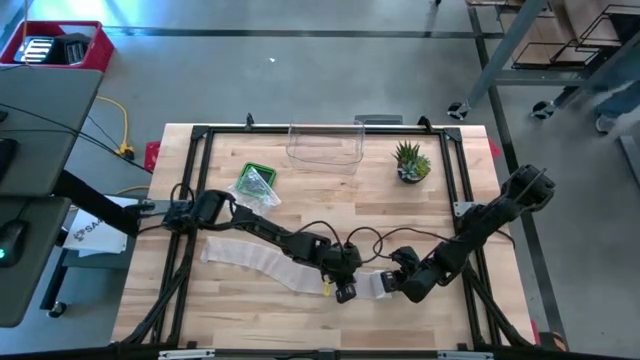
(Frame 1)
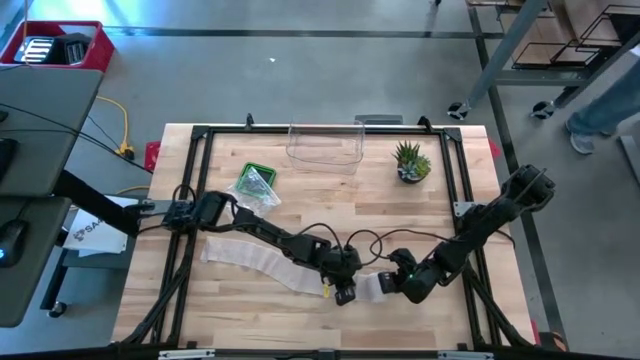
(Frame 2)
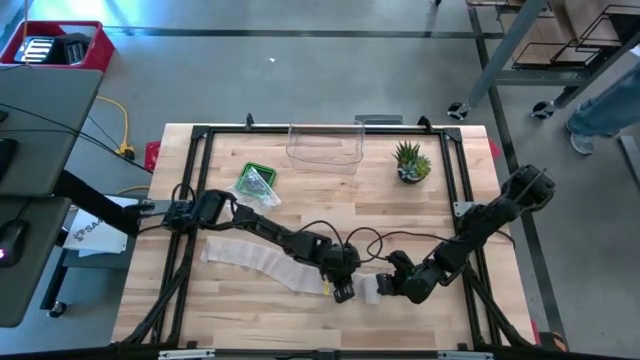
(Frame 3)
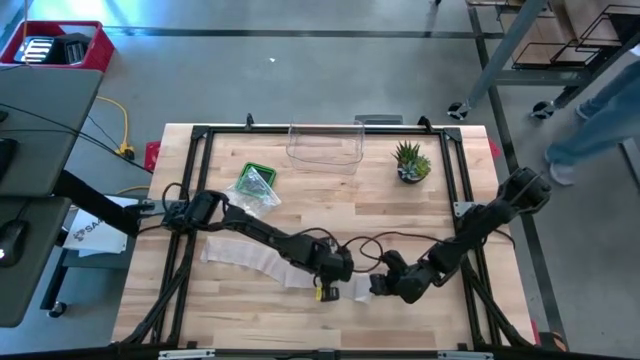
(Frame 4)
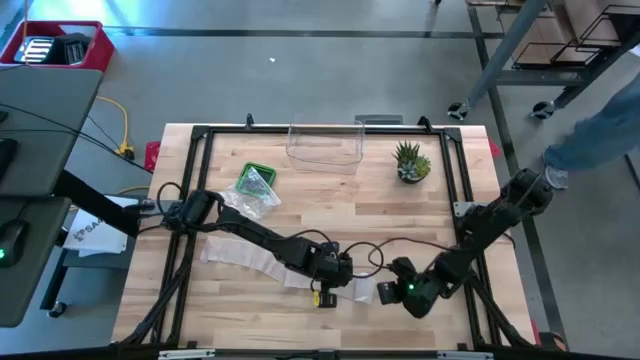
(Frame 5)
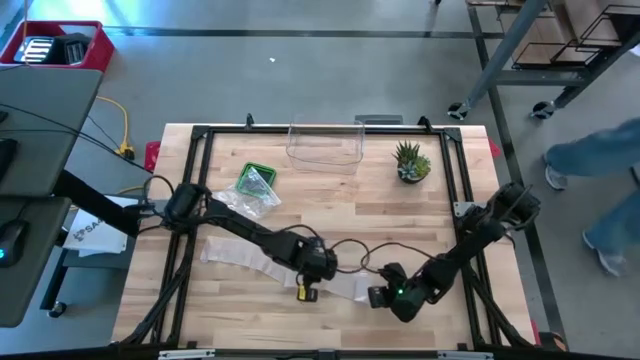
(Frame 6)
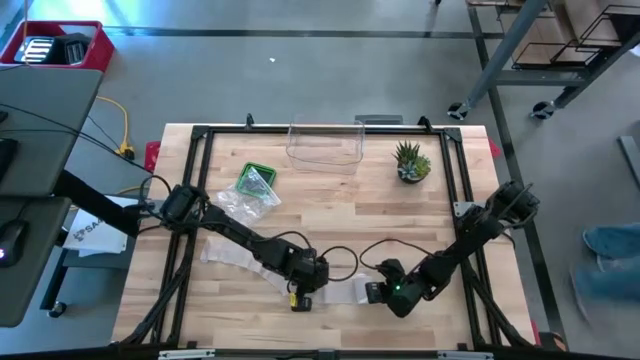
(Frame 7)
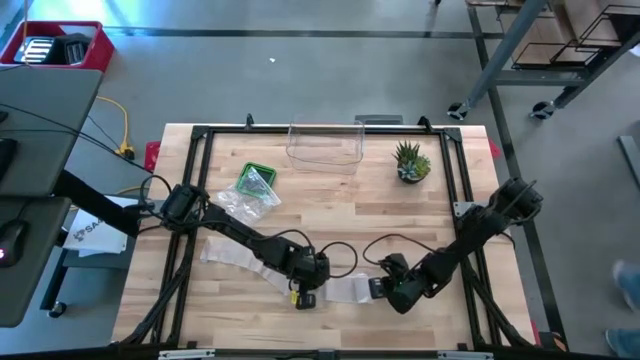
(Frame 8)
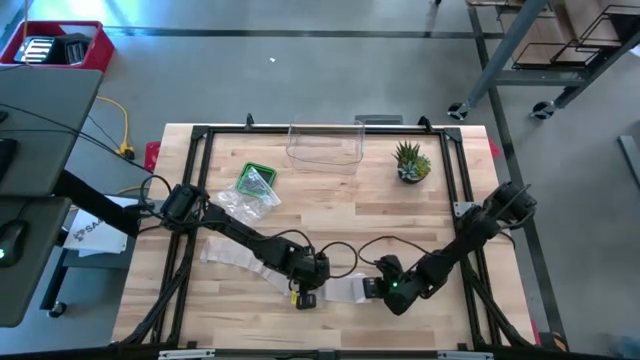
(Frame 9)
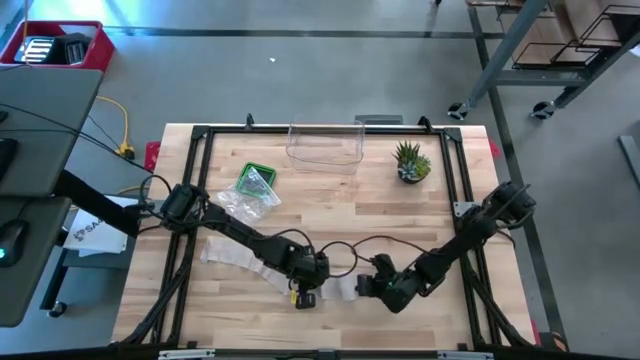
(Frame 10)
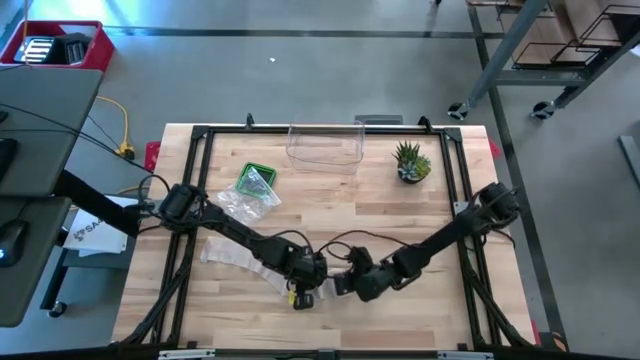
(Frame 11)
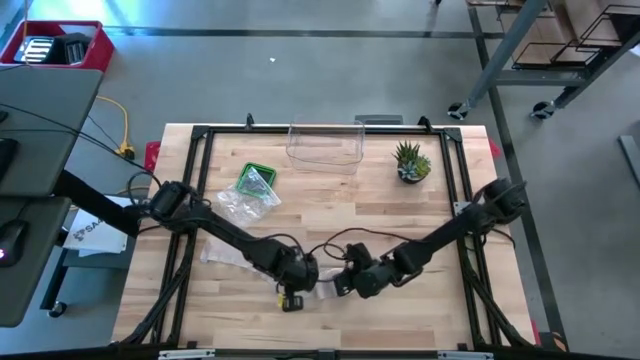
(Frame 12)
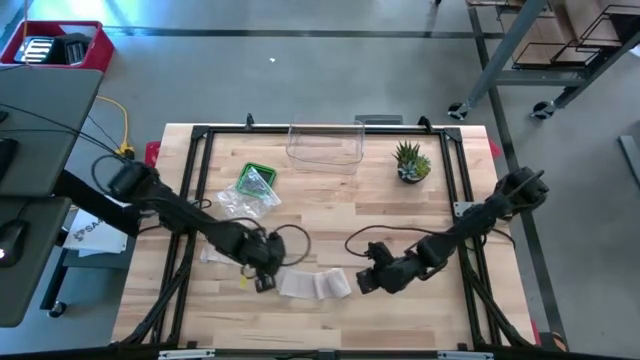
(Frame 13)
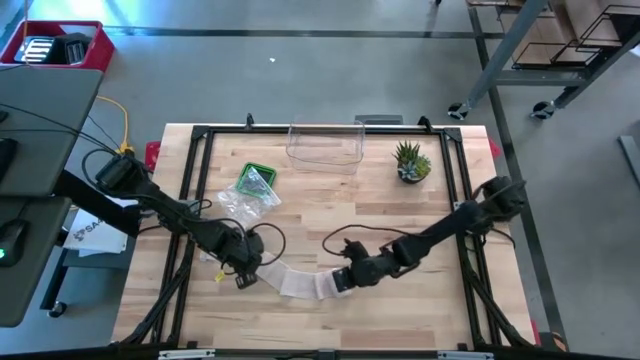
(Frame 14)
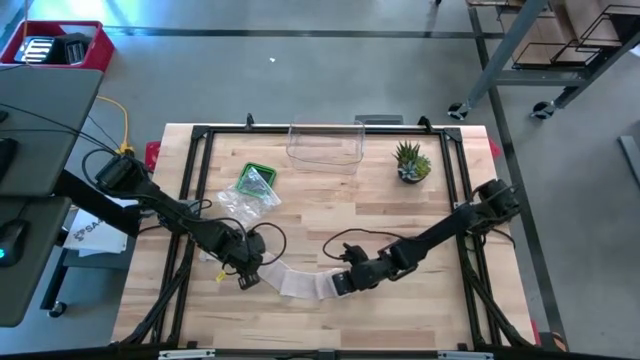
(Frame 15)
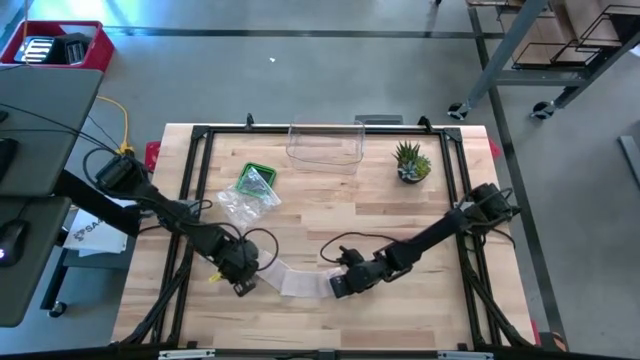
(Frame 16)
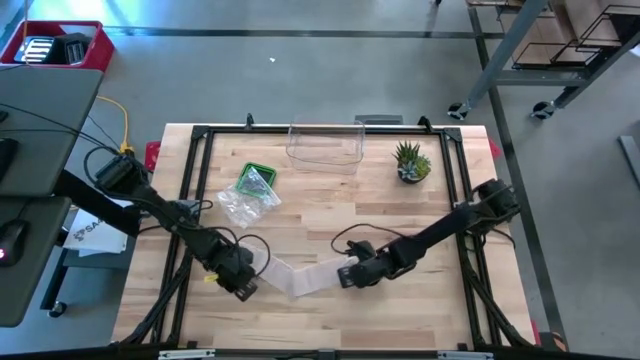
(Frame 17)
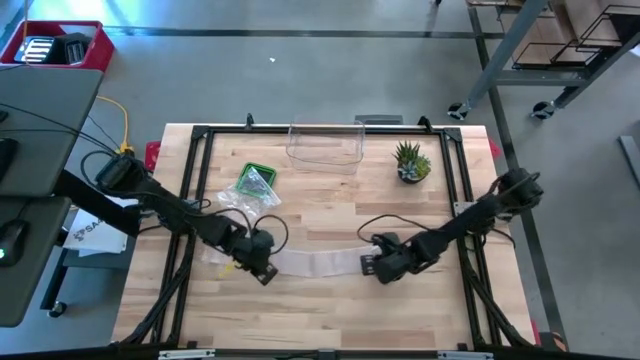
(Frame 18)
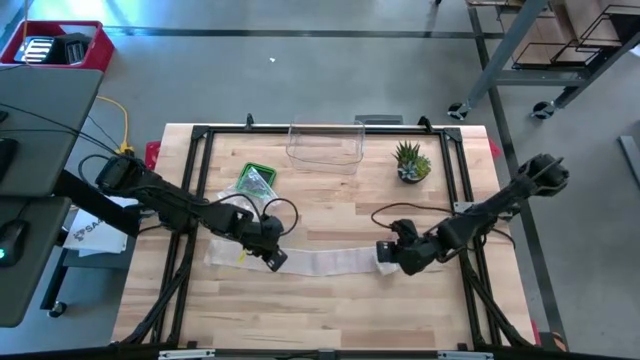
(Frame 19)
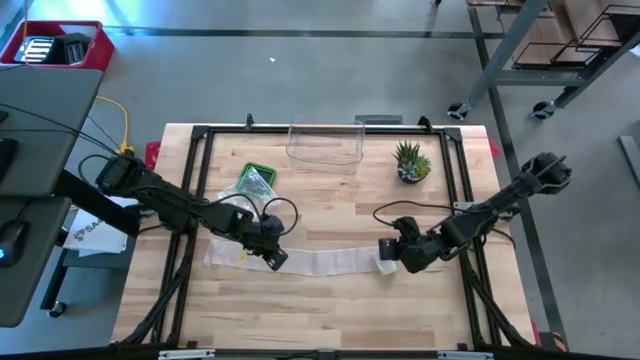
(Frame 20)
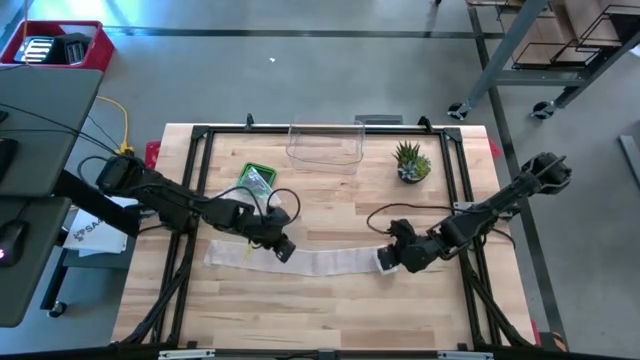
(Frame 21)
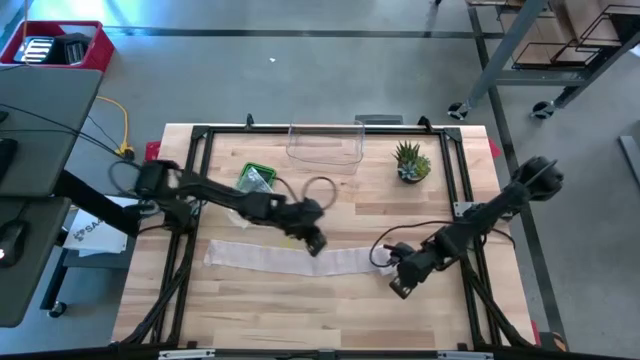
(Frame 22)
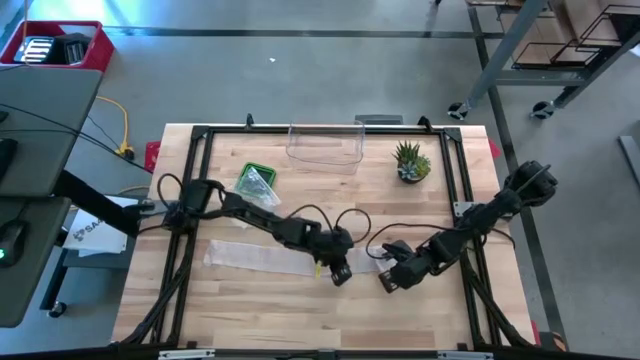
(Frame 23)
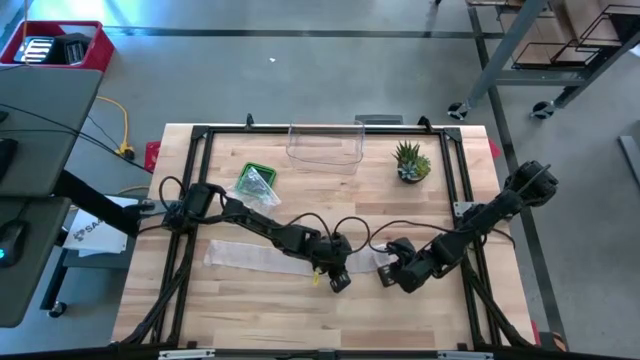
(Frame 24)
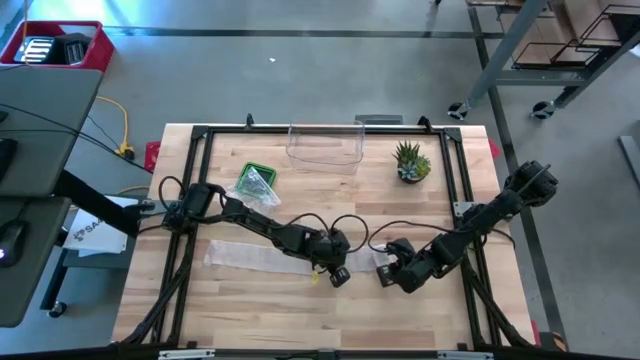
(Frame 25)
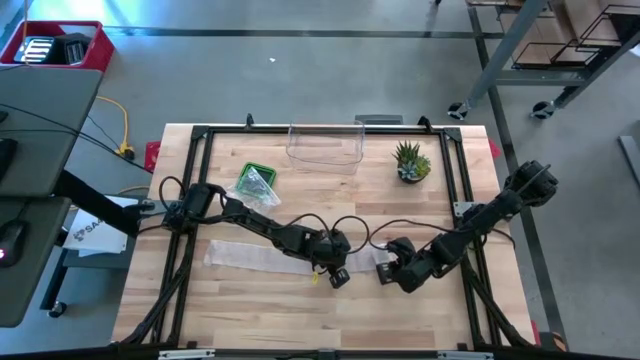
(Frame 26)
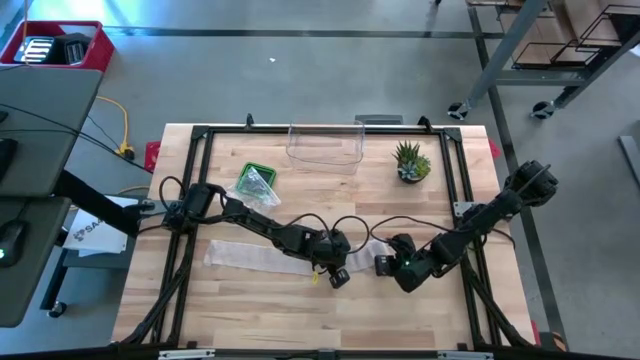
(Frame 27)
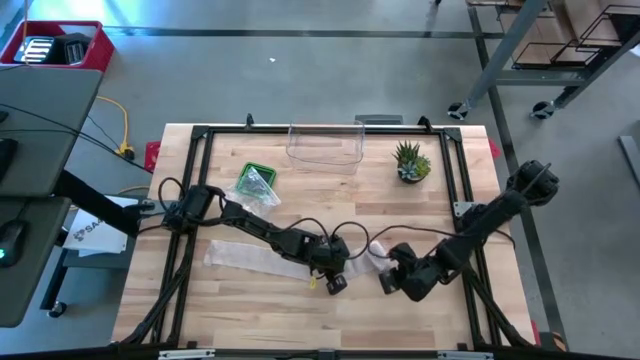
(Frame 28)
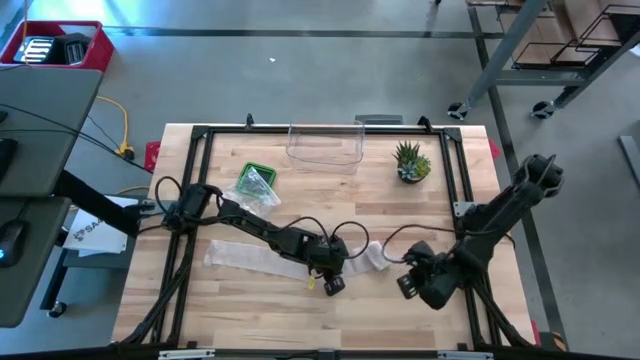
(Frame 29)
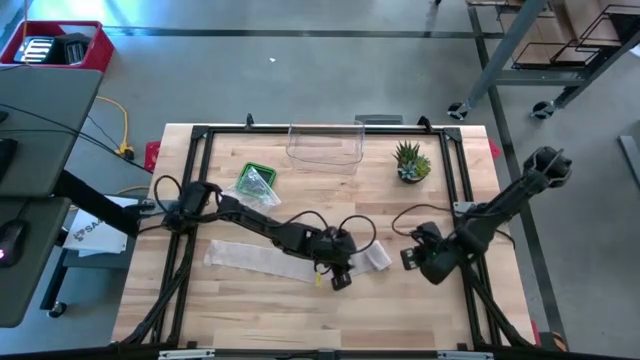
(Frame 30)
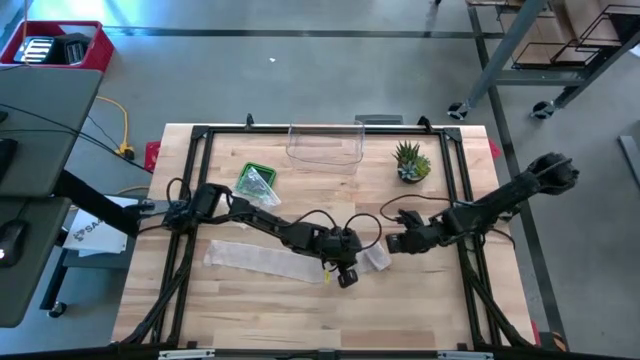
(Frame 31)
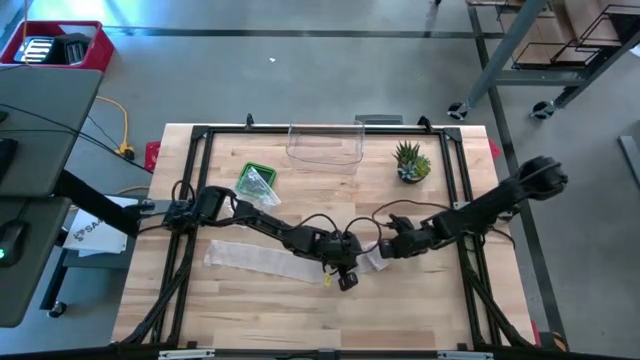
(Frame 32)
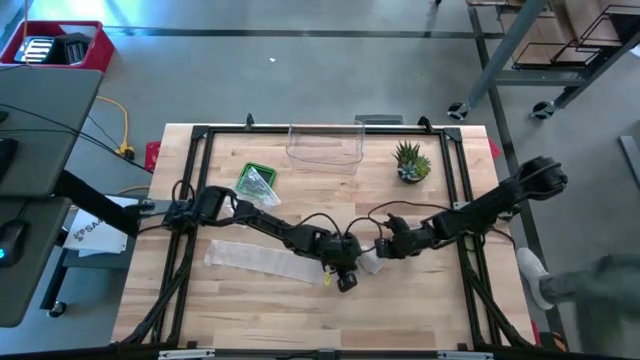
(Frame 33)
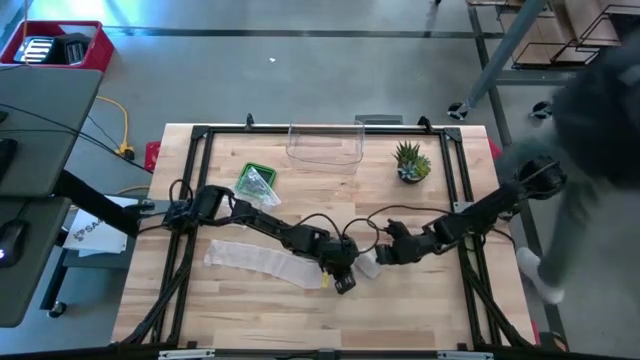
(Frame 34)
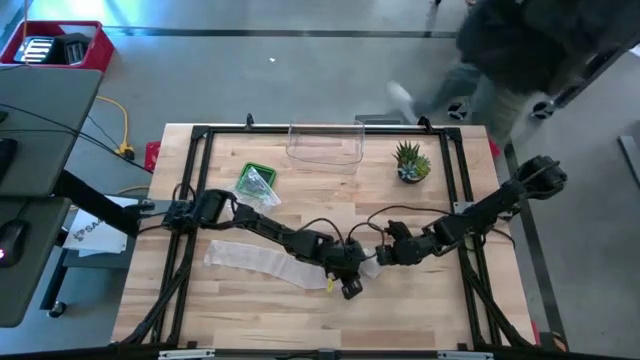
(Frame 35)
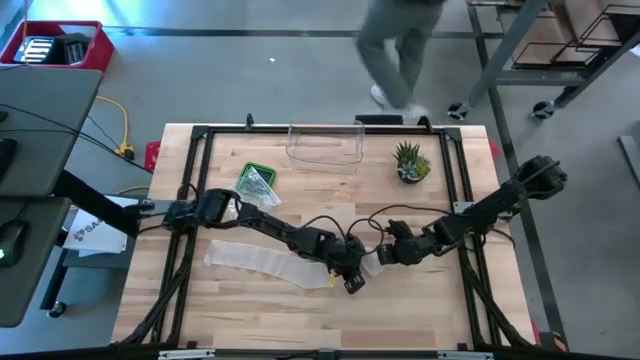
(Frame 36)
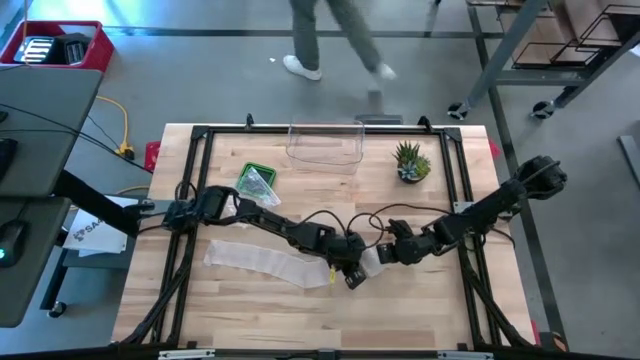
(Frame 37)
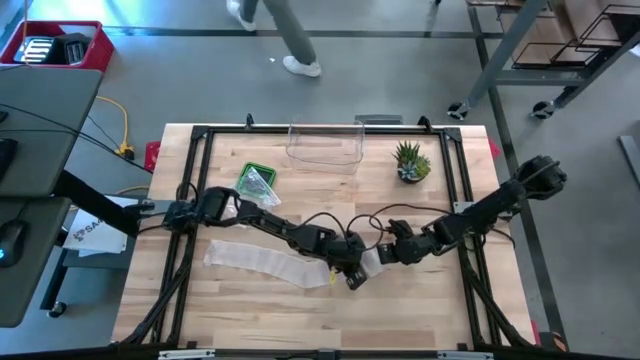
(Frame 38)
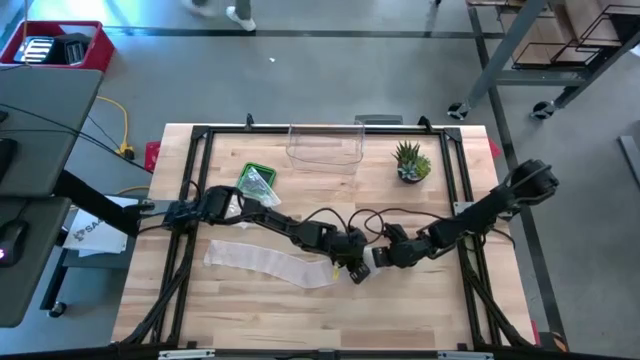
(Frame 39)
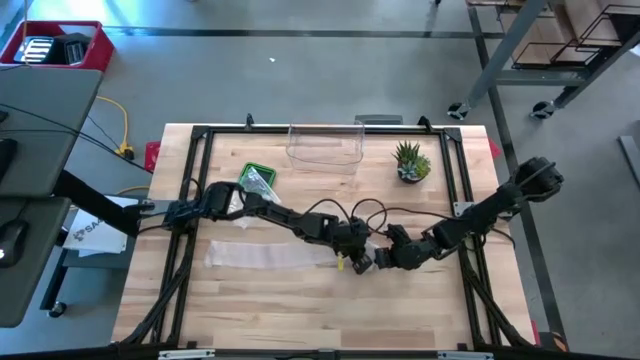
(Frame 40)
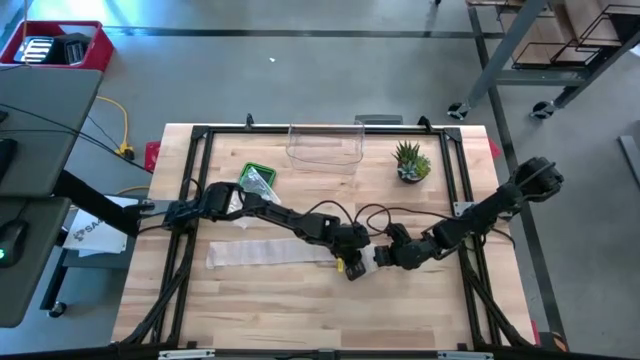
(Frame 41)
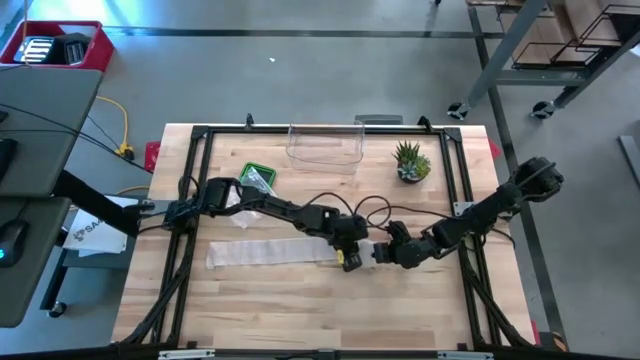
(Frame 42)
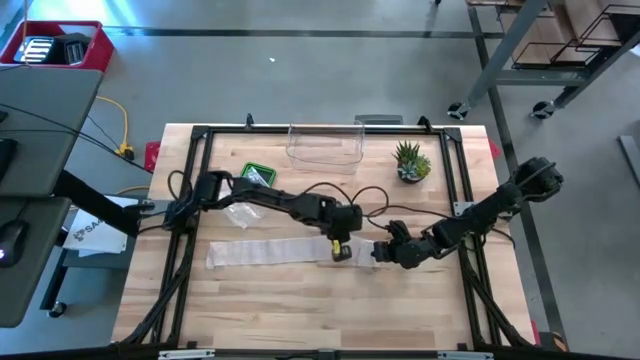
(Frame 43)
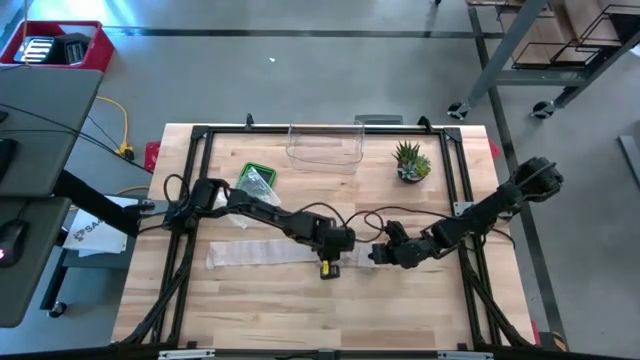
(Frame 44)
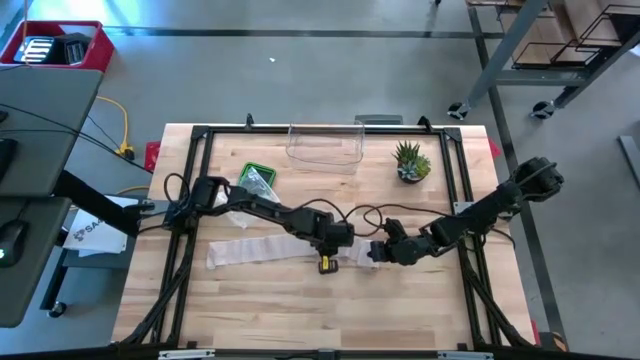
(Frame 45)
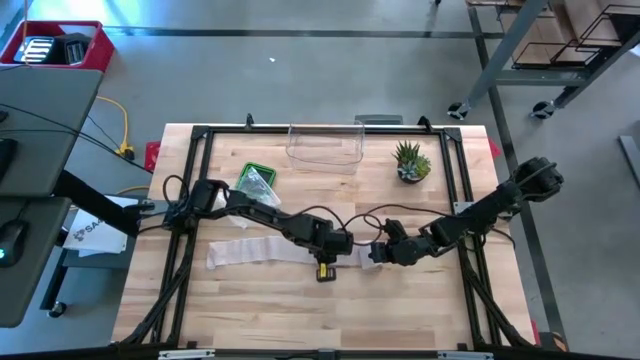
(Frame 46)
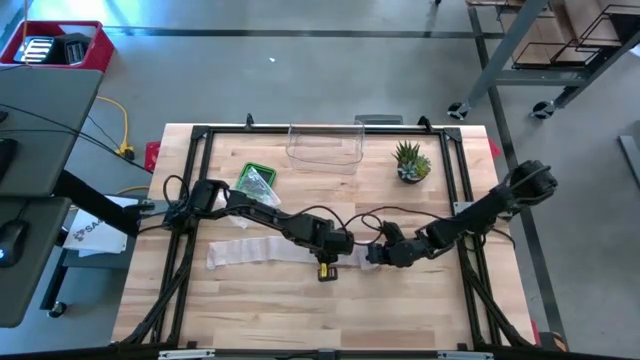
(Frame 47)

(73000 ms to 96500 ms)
Task: Roll bandage
Roll the bandage
